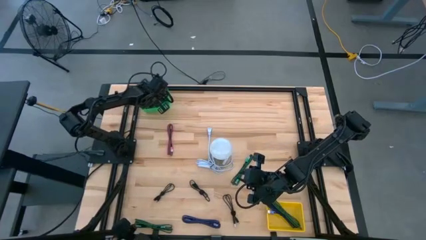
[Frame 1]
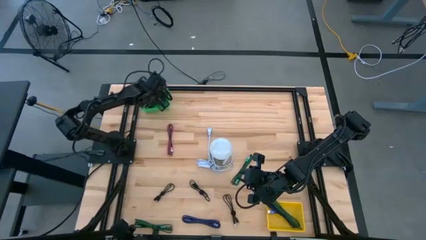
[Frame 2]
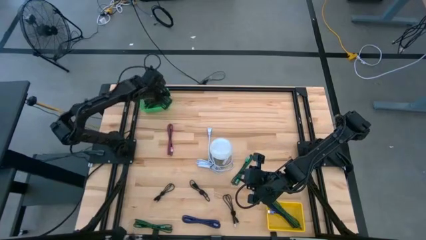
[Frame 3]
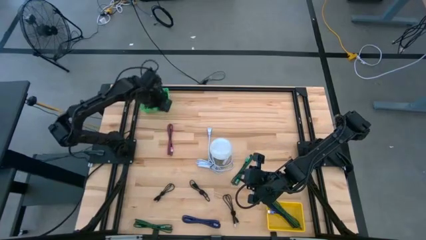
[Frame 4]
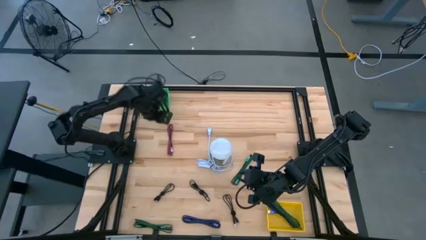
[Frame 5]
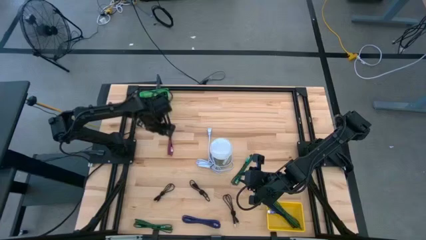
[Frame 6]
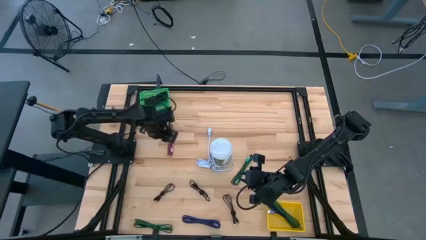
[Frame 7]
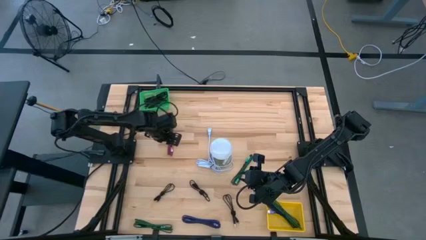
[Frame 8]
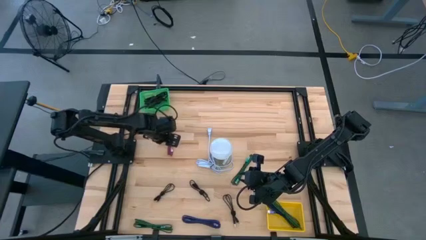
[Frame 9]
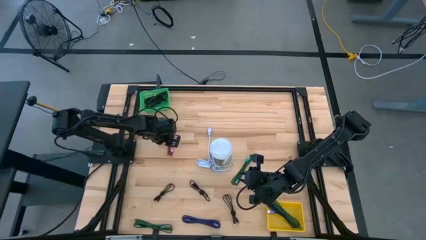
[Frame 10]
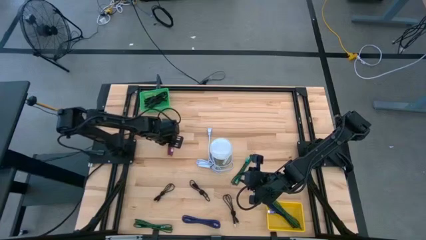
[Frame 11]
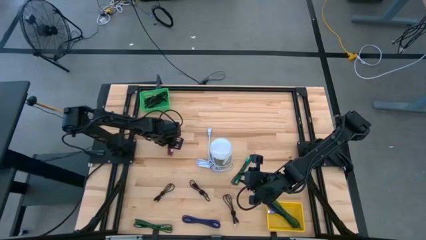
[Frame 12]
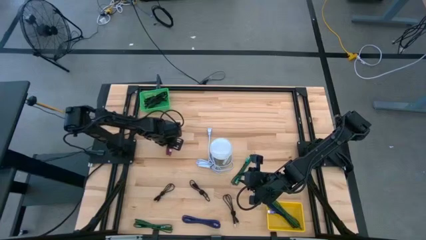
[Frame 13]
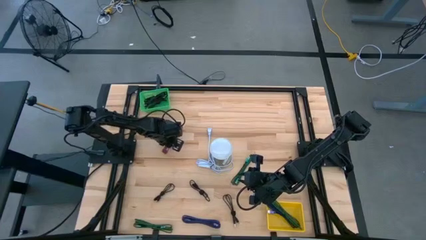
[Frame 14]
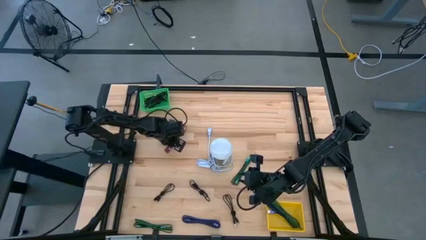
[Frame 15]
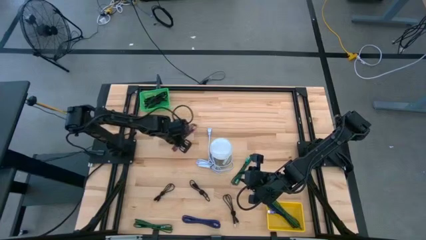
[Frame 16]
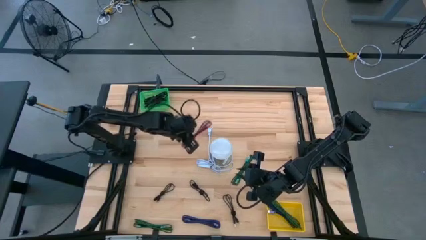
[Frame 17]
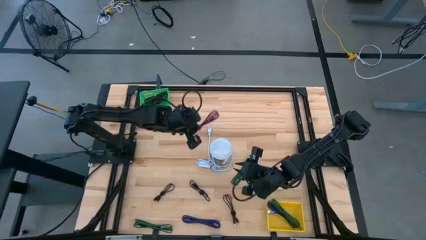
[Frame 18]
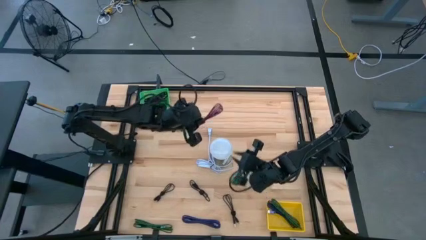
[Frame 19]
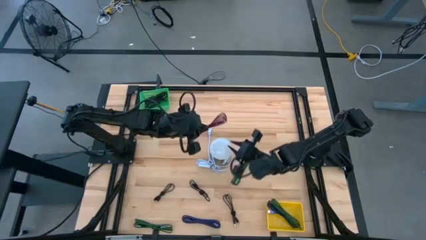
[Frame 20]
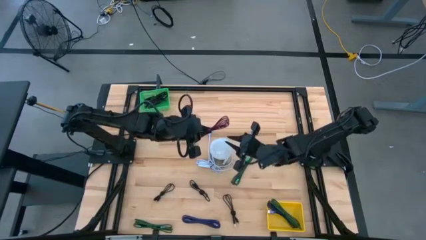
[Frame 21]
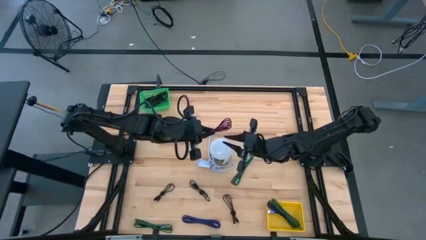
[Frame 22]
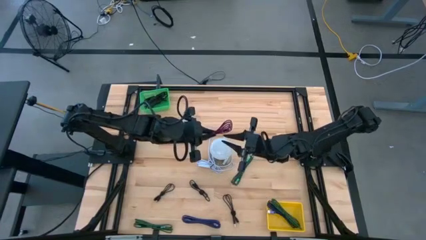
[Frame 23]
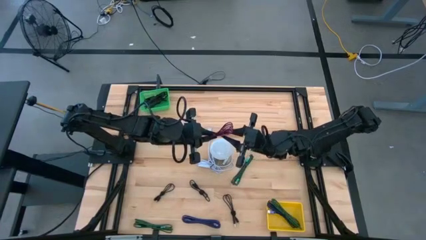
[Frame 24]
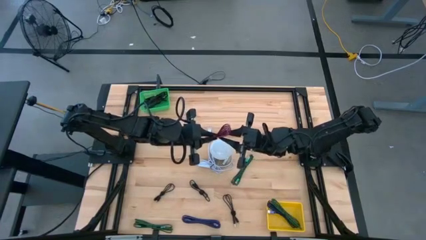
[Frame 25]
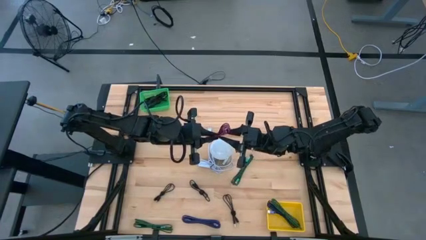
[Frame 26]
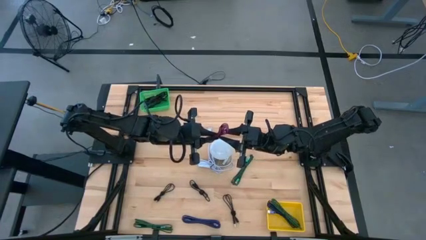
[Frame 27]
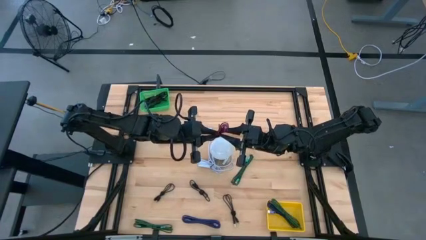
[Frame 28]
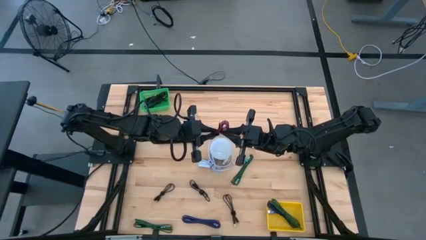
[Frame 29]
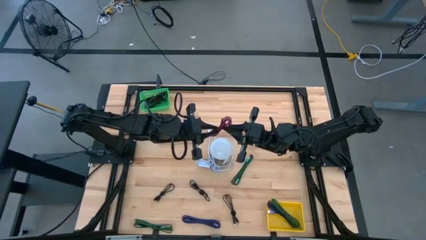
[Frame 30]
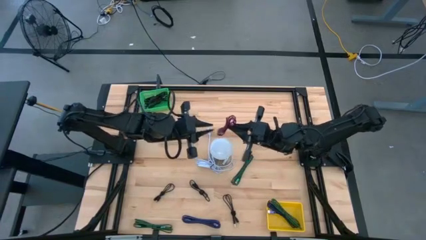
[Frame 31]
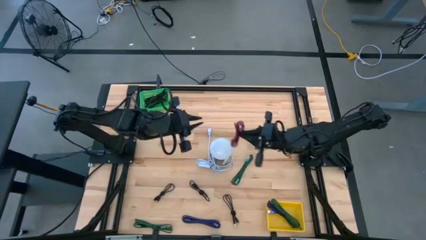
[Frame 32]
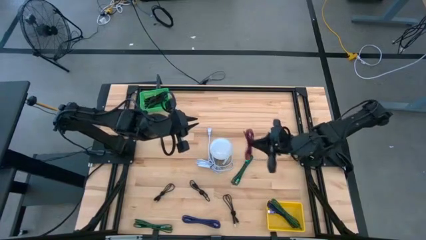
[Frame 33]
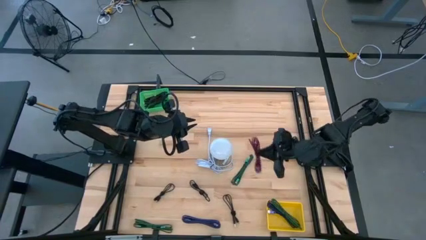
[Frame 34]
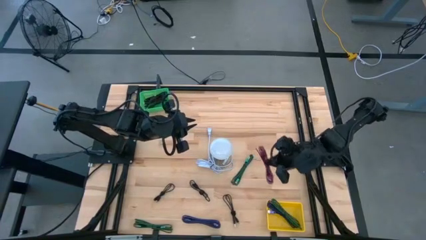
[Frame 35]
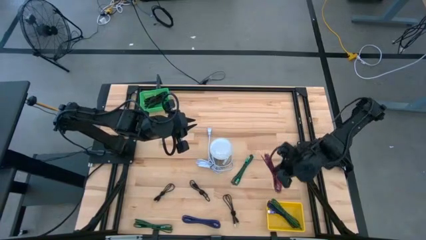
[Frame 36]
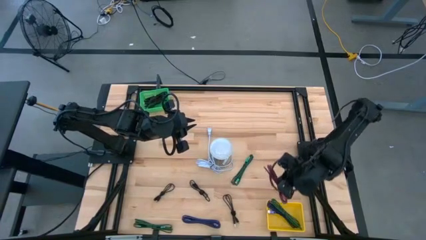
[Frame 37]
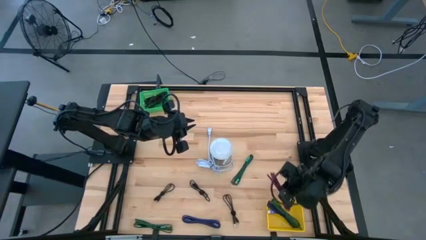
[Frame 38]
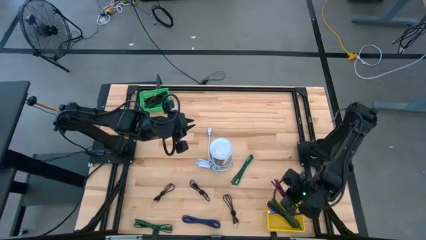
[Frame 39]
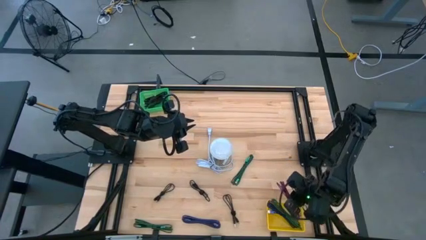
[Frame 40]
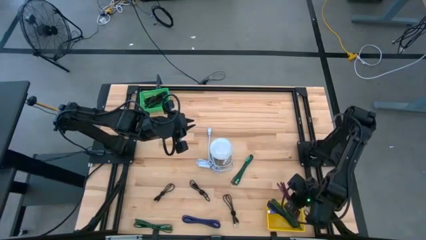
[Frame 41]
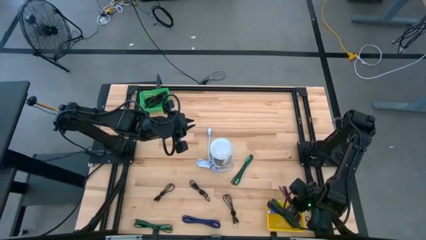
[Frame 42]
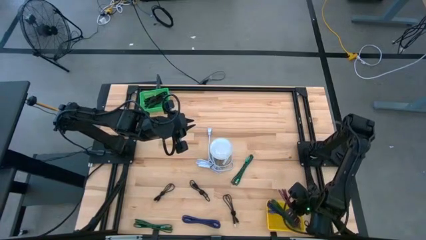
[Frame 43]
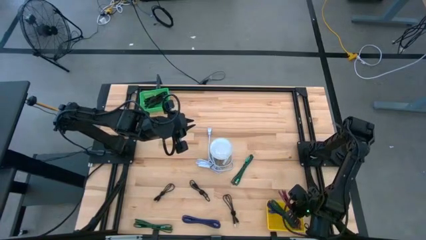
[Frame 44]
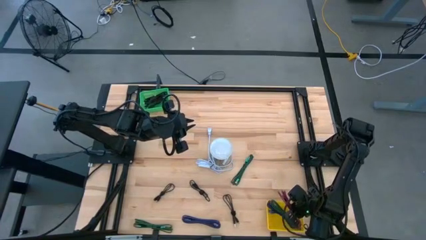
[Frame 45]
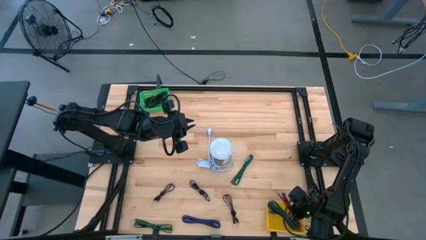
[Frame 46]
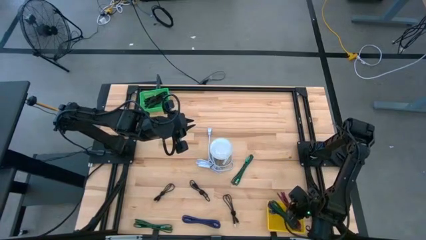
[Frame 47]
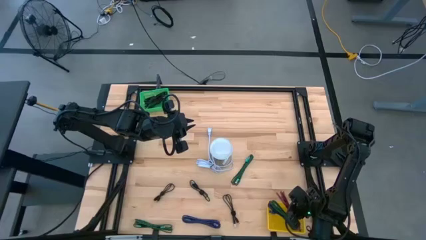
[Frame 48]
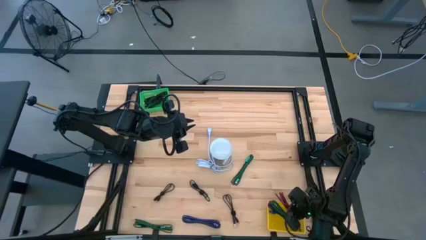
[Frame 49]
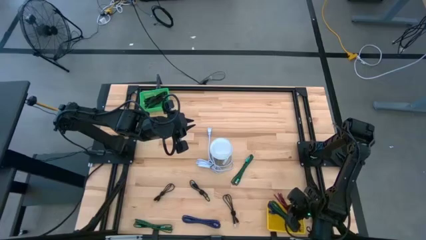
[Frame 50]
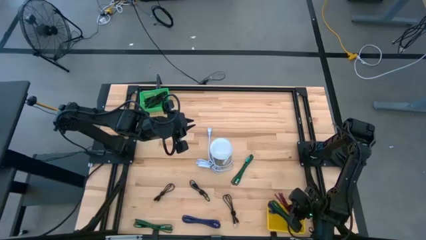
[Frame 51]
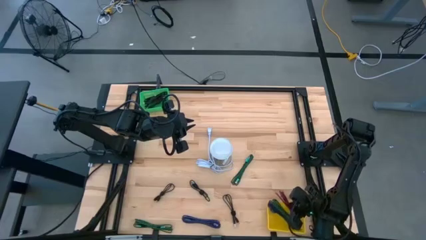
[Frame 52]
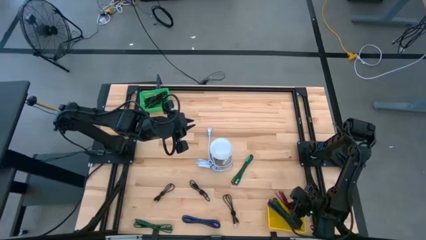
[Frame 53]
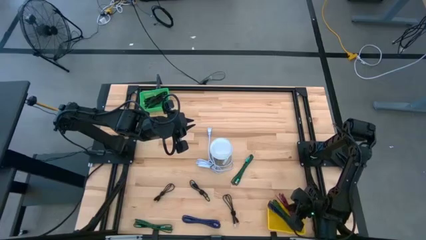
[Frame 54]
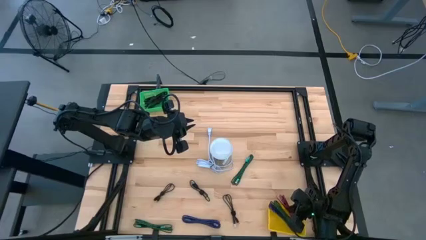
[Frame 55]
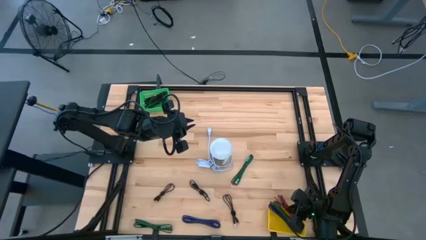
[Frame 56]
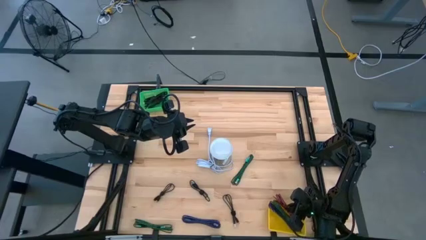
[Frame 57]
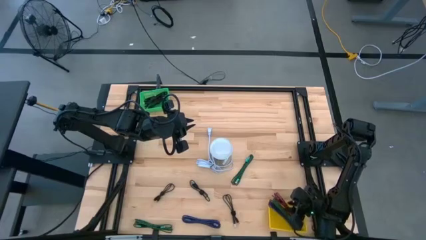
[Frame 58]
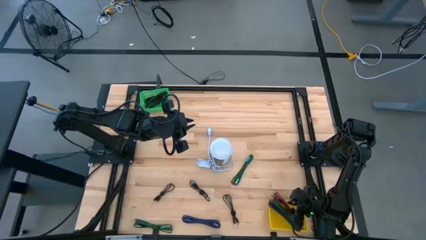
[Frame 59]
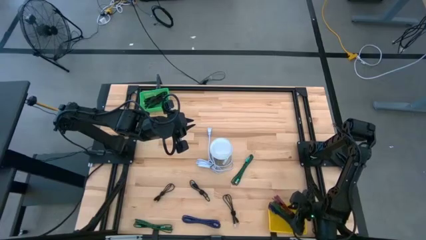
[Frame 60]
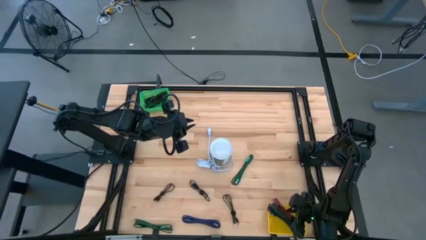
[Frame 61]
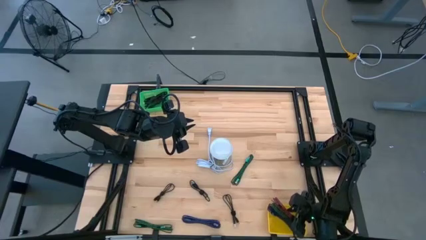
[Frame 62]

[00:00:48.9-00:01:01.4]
Task: Pick & Place USB Port
Put the red black charger cable into the yellow basket

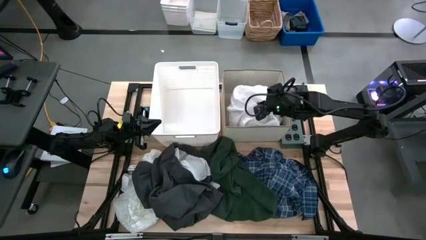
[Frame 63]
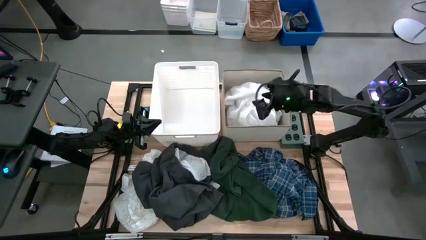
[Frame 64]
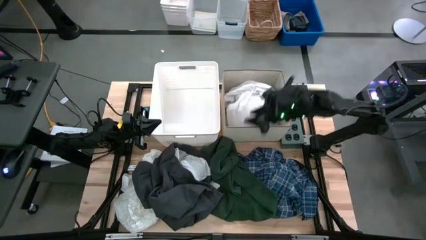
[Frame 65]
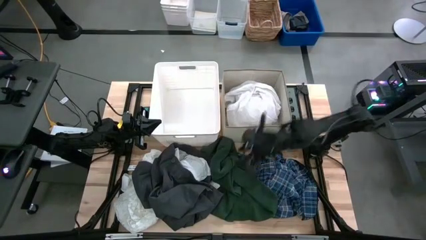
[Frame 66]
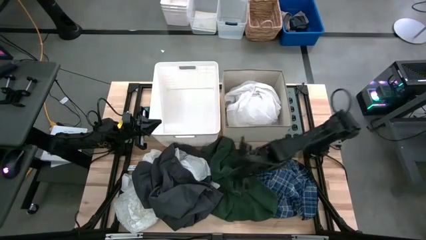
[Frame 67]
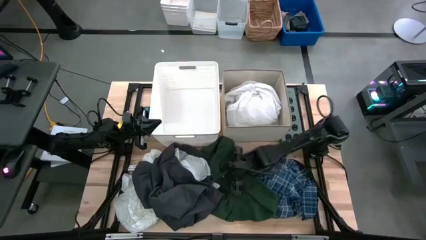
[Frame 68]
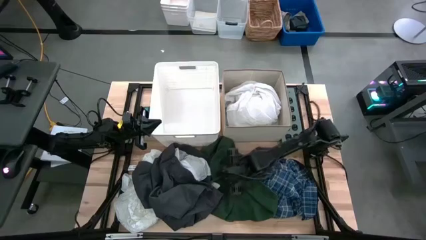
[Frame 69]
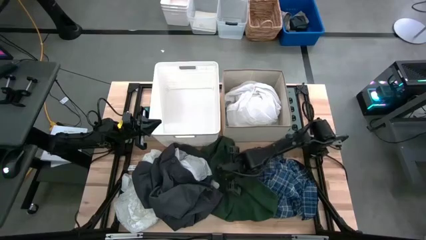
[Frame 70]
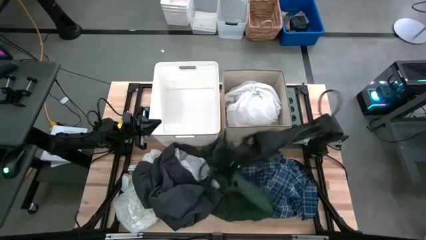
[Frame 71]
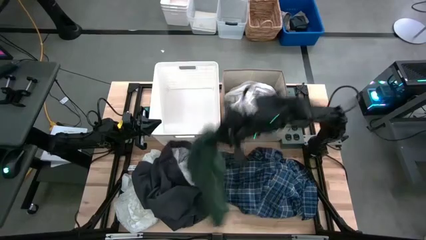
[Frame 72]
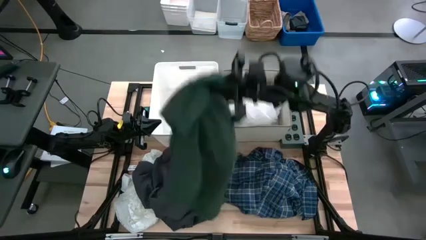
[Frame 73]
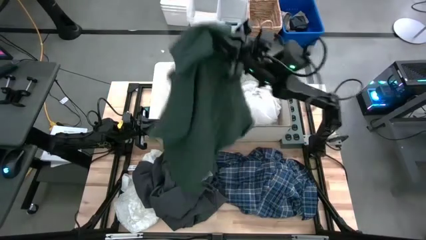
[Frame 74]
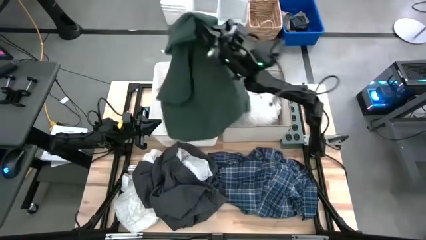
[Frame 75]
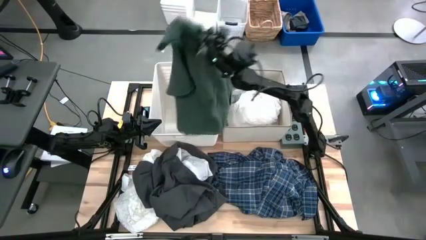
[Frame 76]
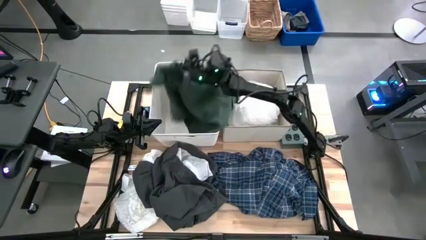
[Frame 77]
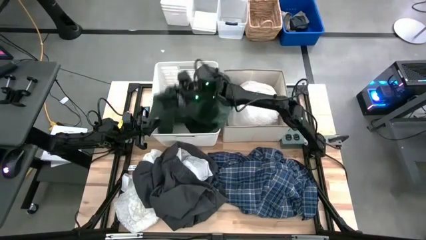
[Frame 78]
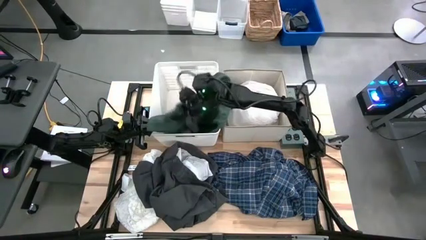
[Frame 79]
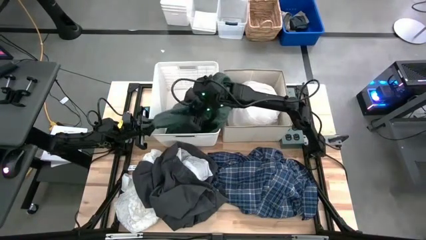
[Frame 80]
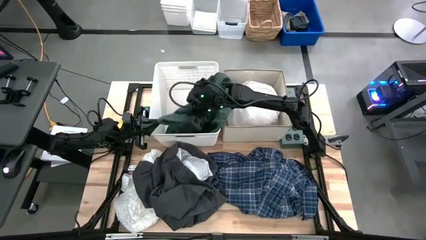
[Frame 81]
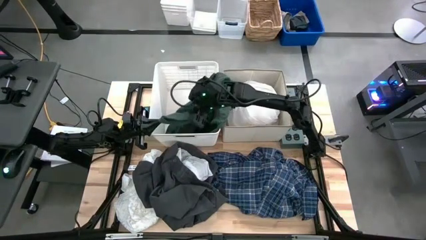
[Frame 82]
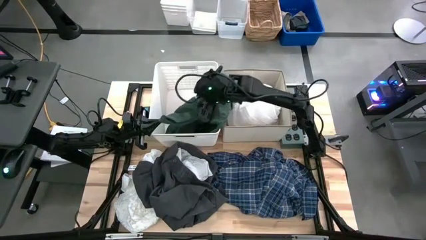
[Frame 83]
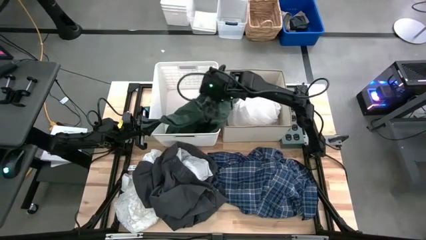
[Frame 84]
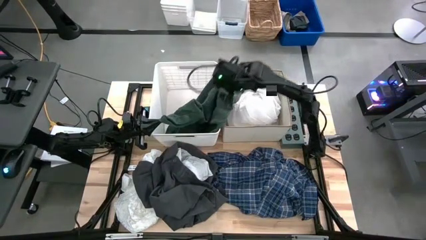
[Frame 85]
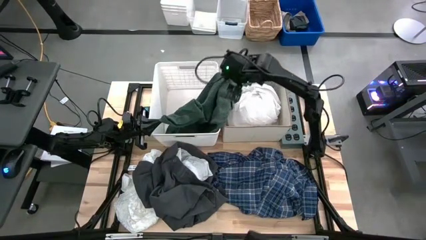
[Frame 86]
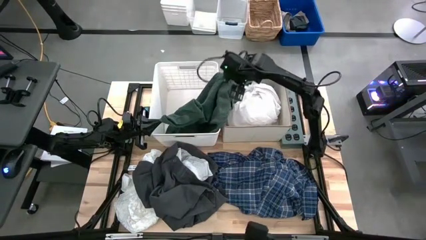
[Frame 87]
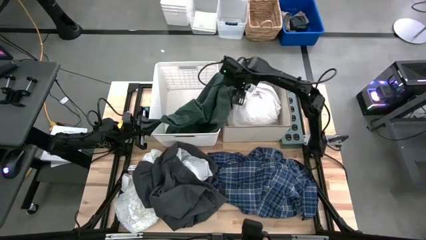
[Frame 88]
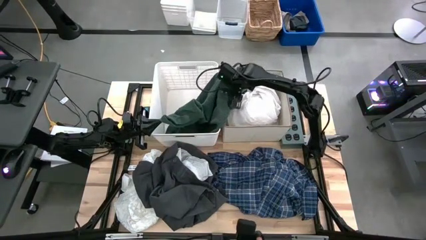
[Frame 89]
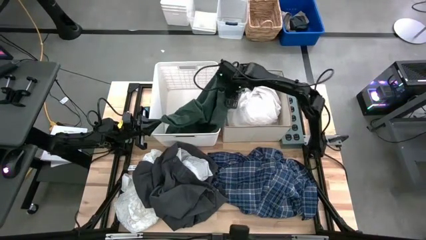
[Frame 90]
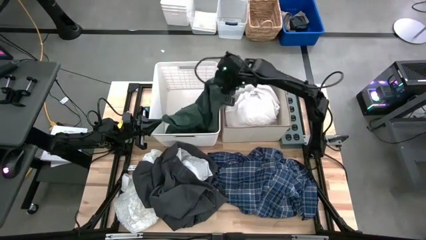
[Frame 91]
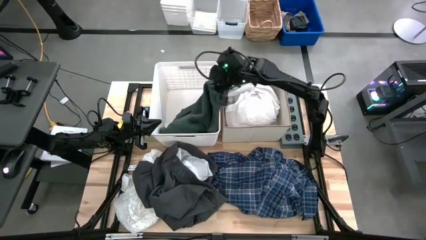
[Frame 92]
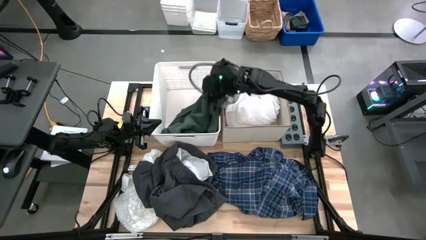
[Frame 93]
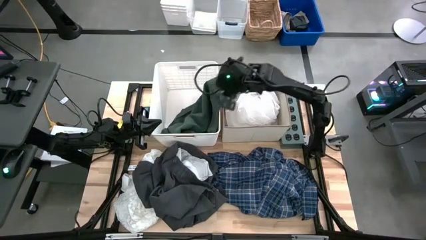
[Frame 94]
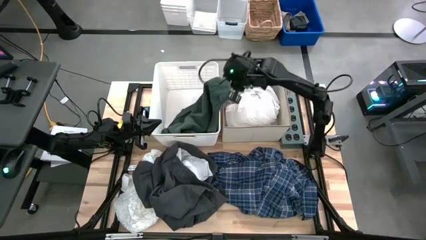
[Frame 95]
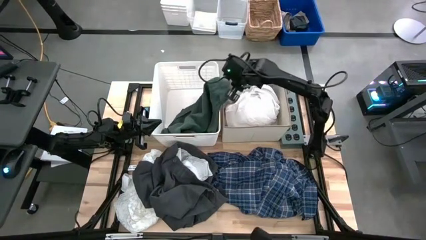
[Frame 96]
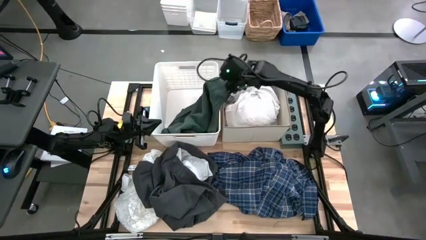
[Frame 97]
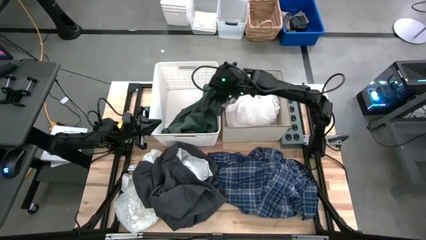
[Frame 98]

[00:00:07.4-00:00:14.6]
Task: Sort clothes
Put the green shirt into the white bin
